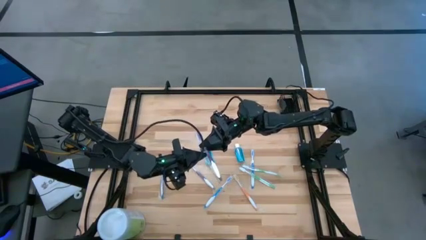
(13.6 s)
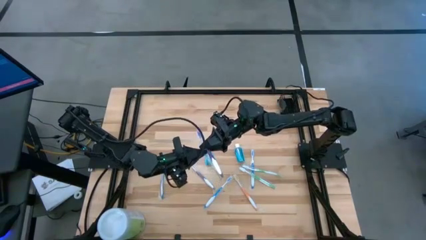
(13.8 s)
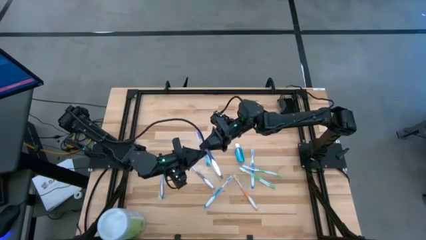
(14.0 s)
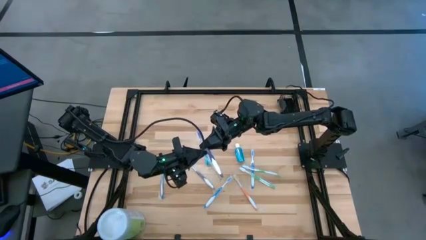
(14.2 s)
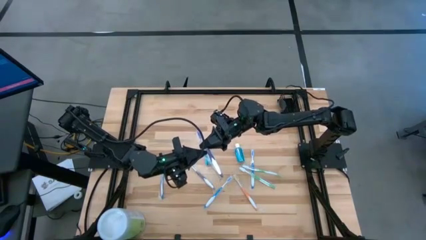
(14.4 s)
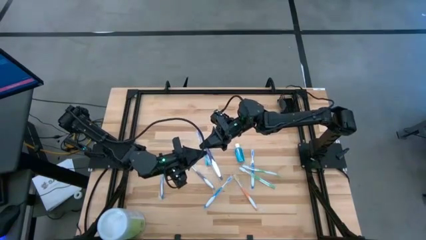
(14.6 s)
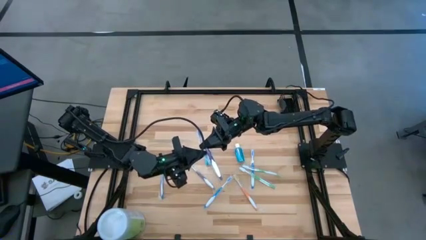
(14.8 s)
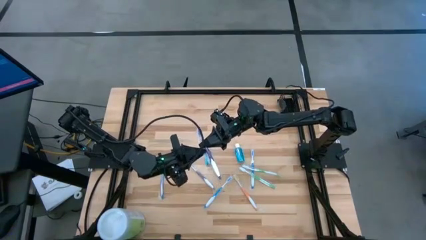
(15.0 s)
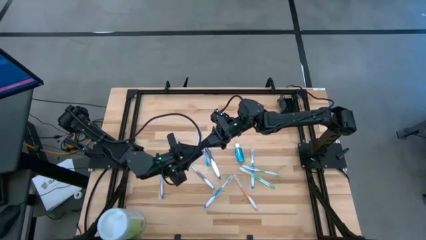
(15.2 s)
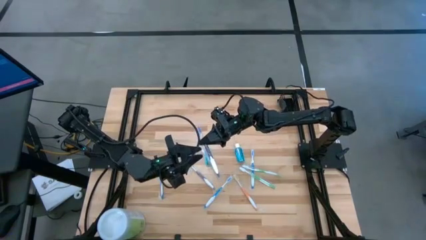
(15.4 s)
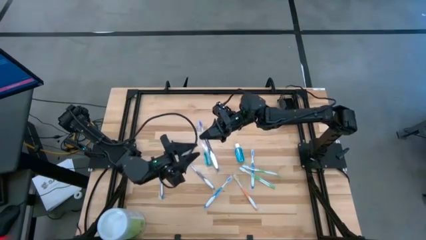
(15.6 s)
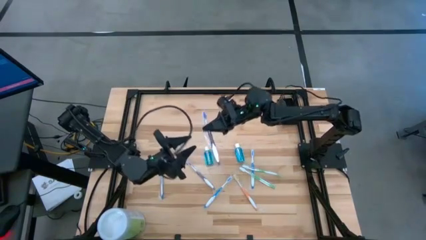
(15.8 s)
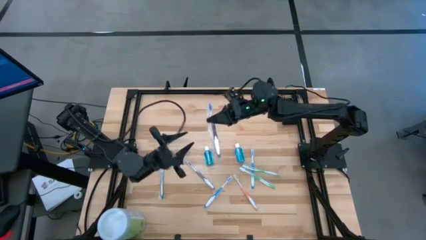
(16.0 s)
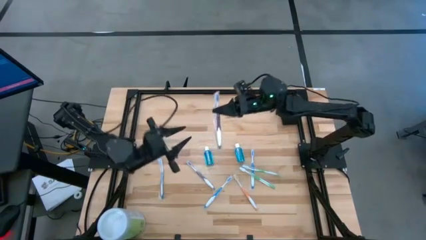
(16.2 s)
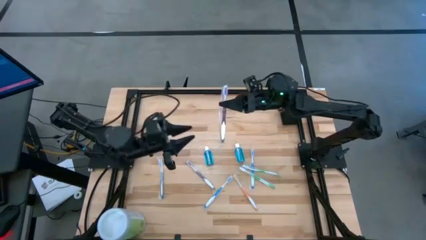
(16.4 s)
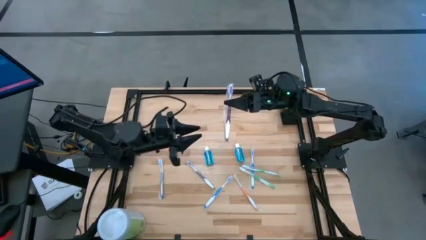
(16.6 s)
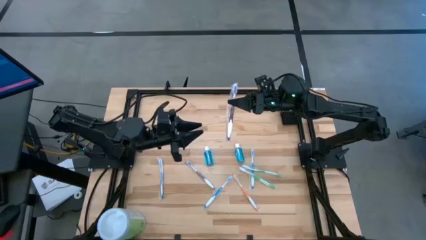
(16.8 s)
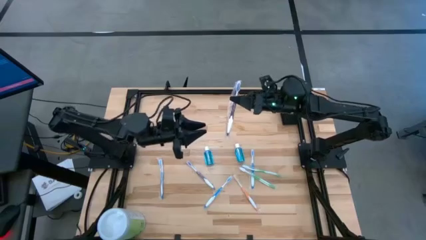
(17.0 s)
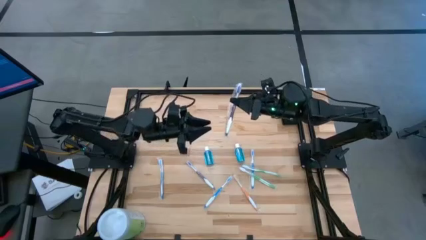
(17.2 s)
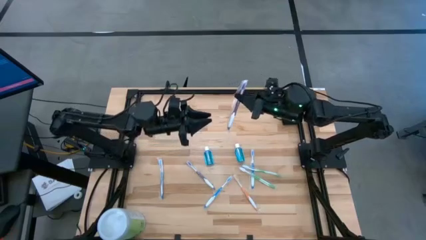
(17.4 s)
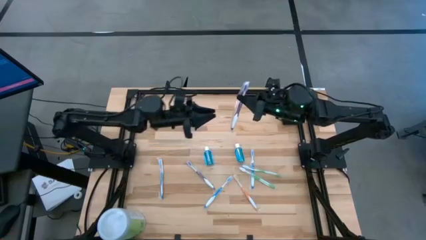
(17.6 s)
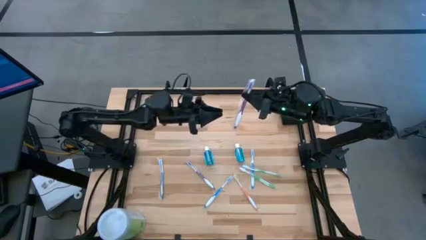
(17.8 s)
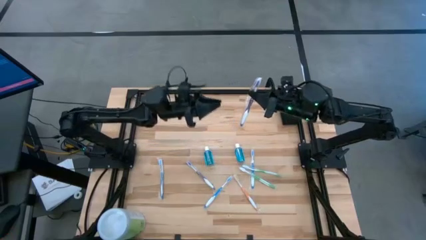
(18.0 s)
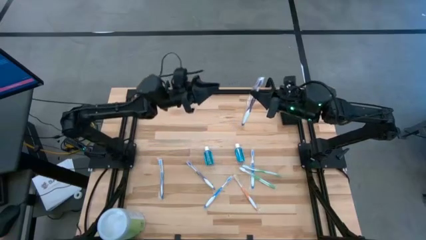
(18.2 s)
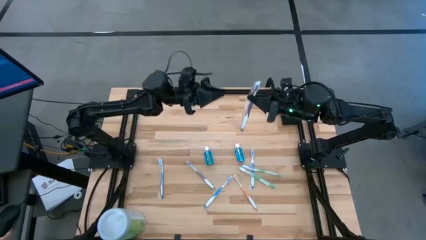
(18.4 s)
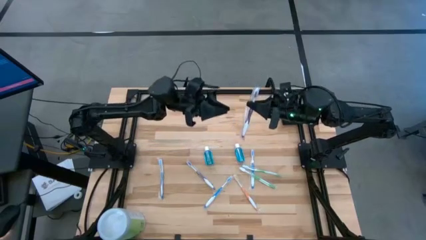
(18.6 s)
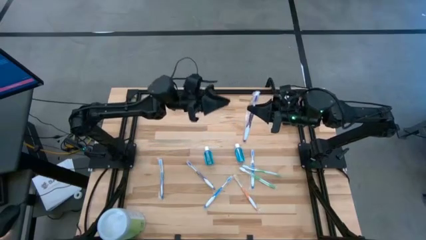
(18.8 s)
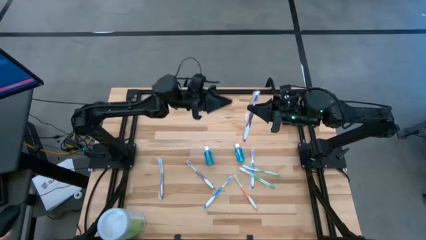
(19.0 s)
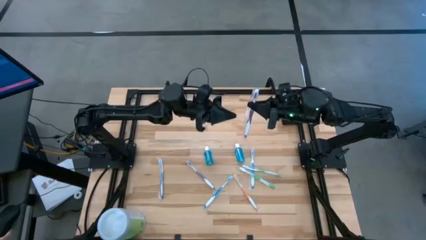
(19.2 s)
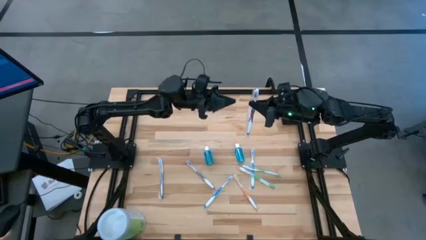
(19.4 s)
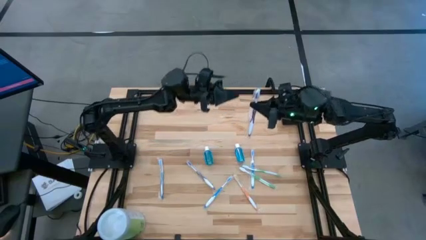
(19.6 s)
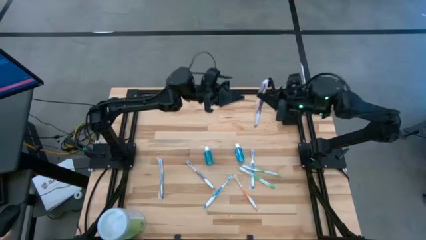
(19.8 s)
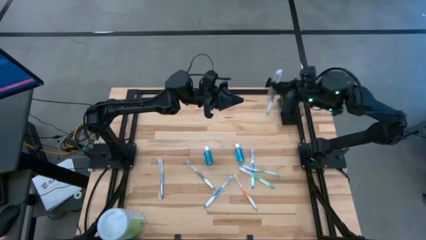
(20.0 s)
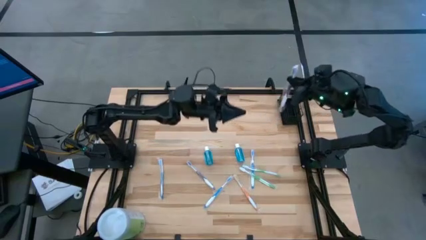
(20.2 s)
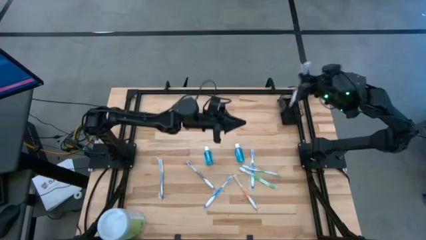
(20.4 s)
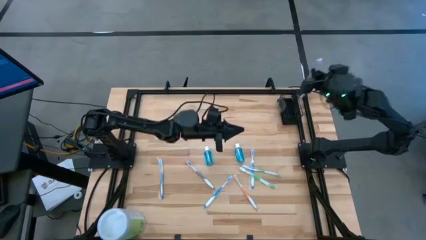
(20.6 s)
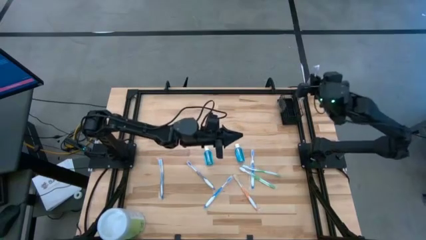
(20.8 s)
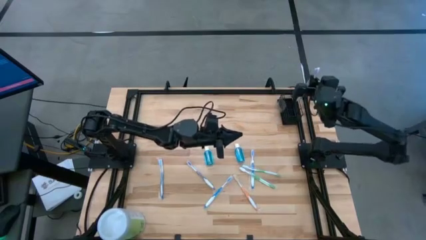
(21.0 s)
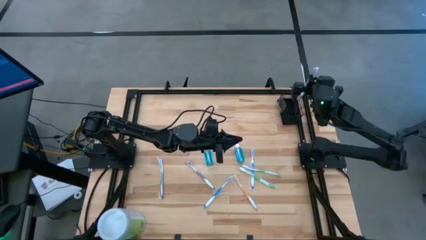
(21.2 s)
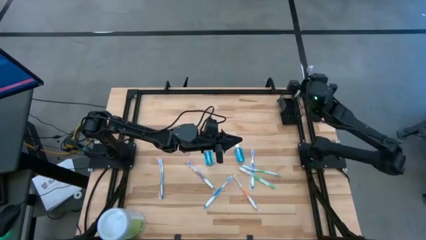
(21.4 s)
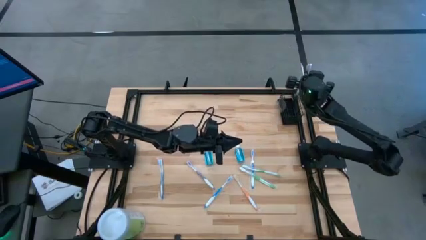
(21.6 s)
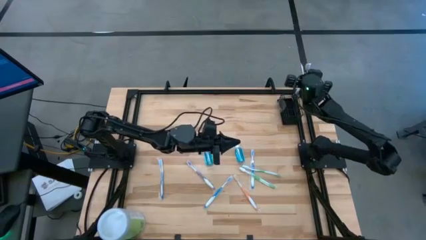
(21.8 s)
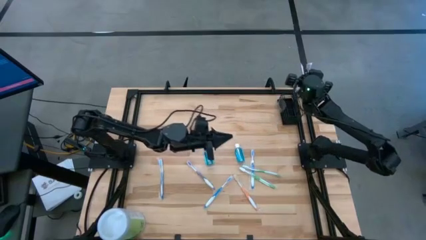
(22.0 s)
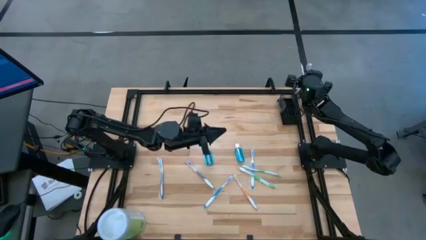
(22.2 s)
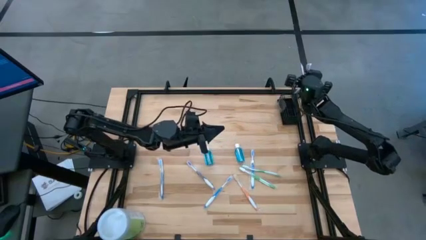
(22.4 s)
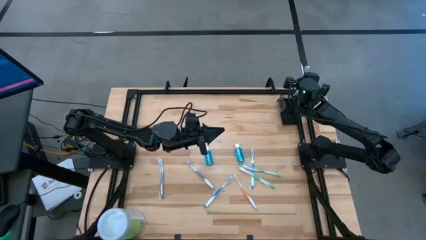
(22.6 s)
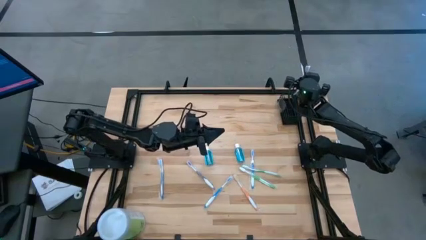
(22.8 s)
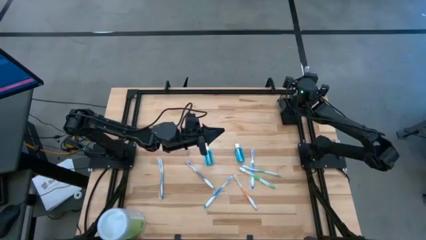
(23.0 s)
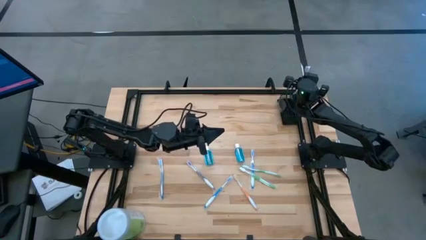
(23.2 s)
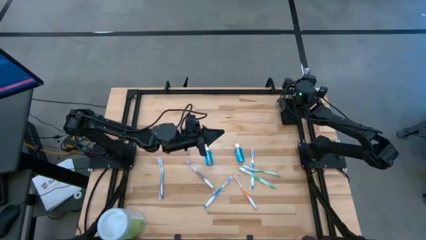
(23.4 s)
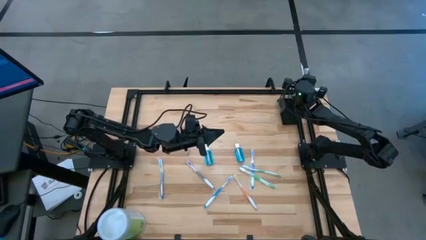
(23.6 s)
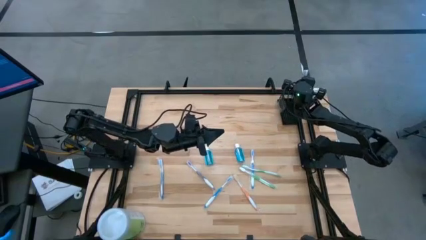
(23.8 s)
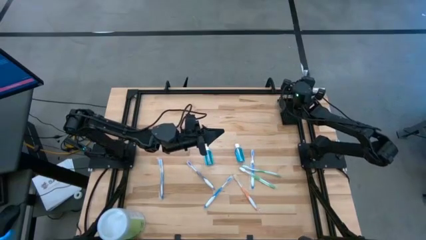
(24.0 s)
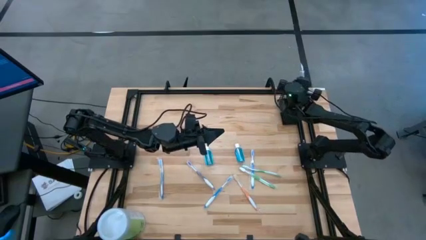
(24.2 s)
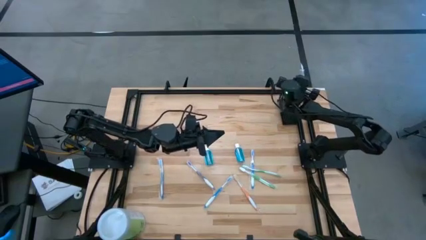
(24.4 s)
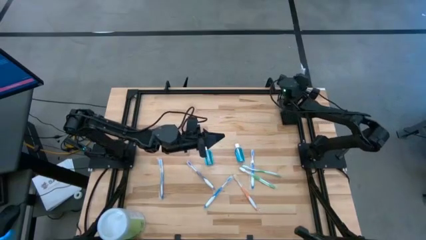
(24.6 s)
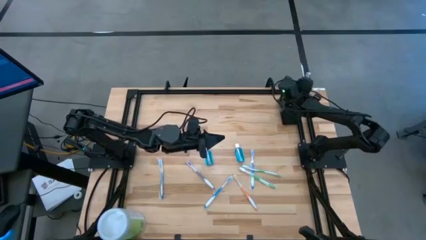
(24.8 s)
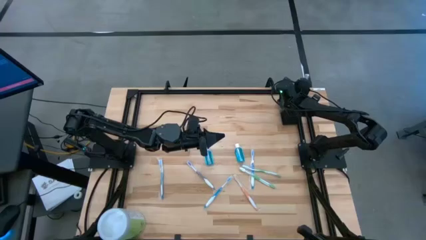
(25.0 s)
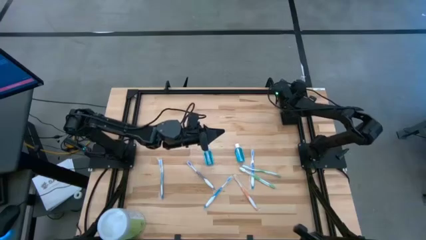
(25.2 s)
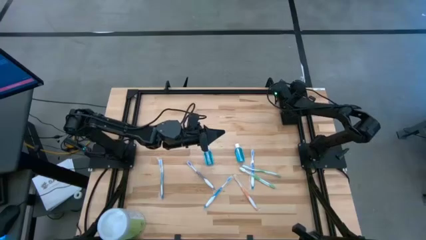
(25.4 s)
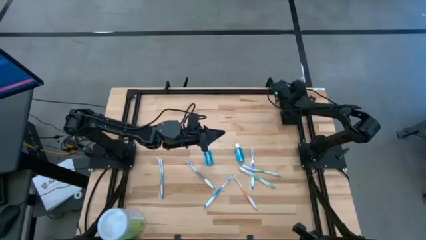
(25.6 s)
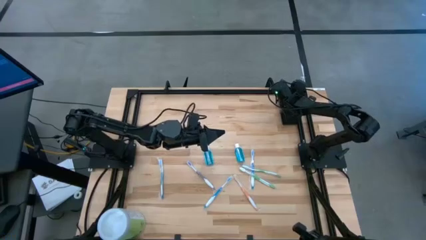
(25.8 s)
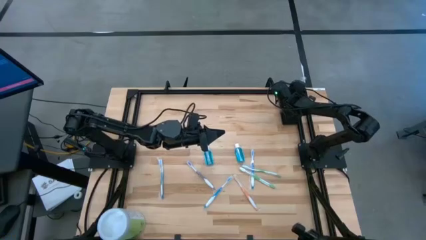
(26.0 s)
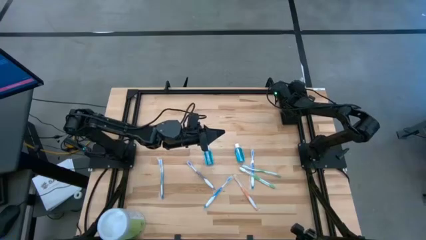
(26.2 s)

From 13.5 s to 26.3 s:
Task: Pick & Place toothbrushing station
Put the top purple toothbrush into the left section of wire organizer
